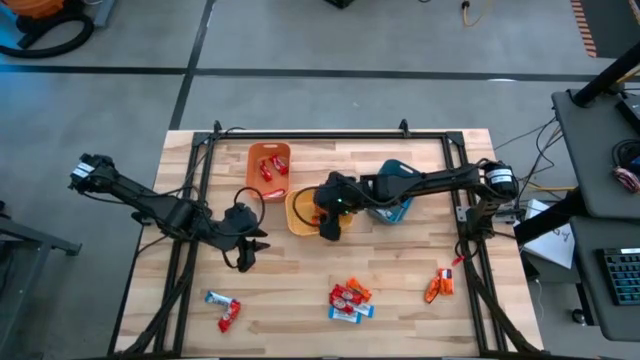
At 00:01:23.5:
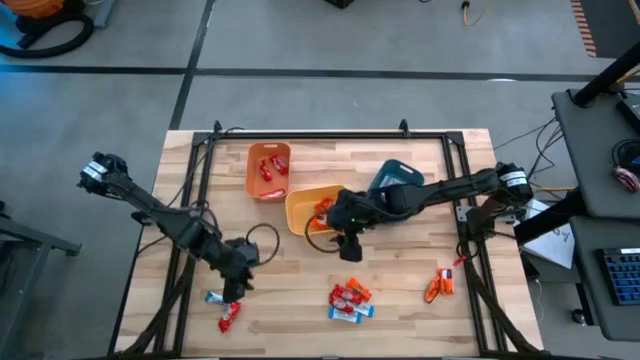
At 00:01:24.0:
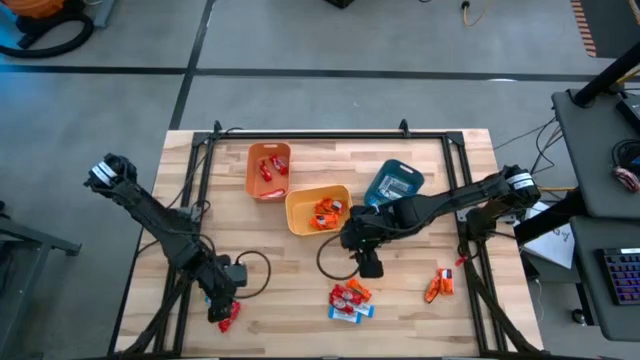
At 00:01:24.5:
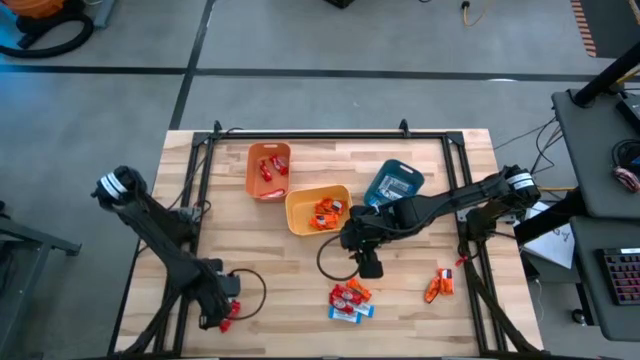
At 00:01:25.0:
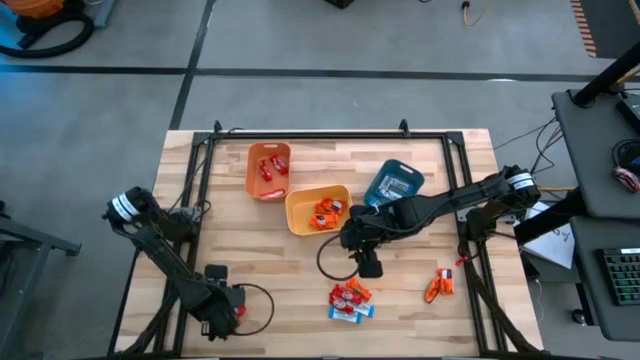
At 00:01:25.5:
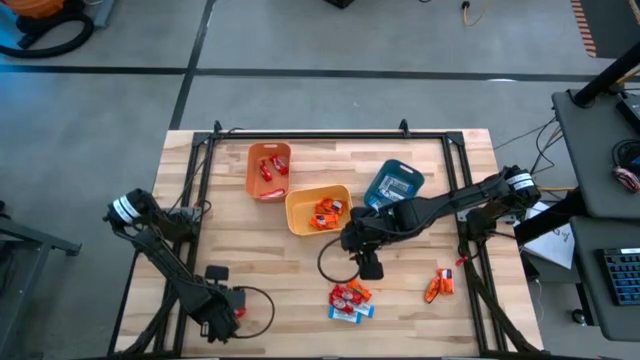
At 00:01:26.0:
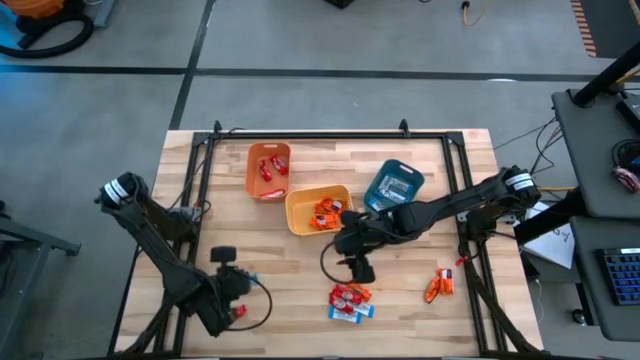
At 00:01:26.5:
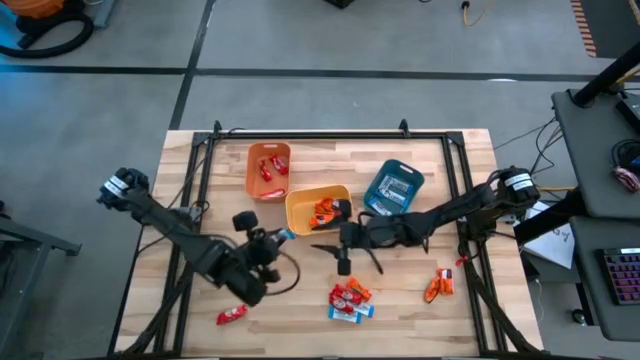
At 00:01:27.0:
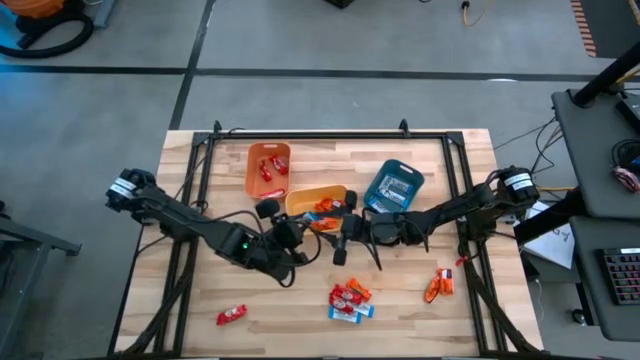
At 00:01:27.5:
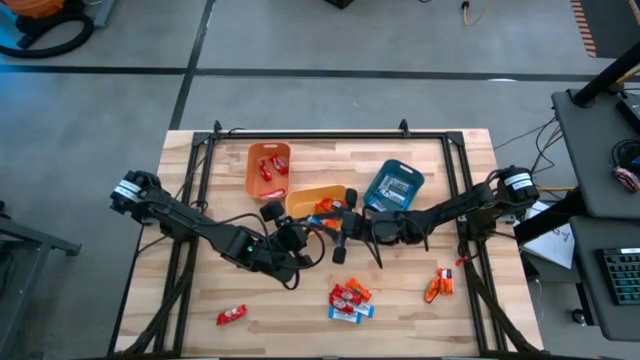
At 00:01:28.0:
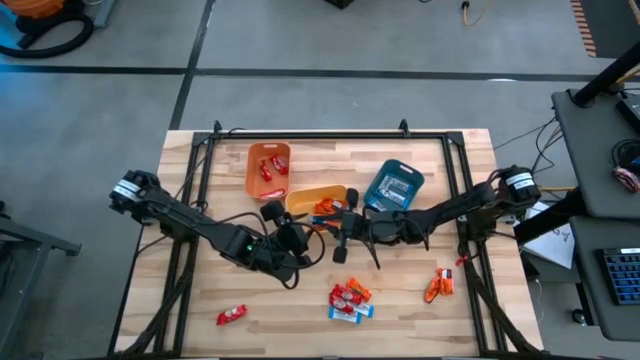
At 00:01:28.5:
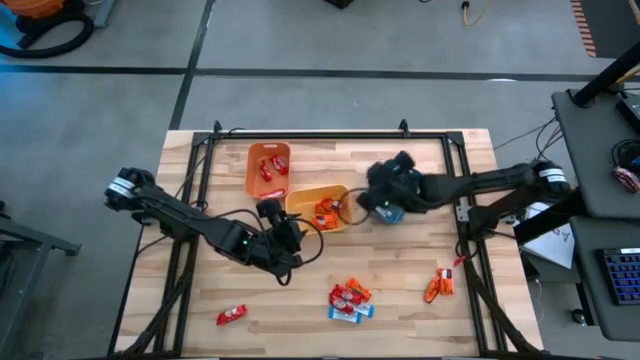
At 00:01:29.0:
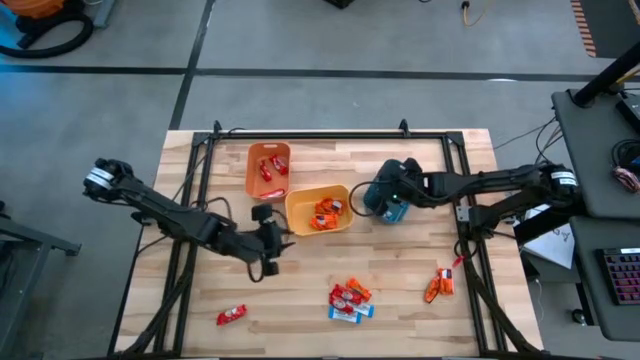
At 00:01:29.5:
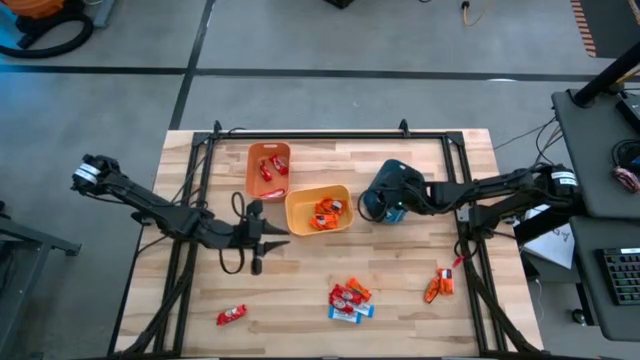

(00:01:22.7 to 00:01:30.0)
Task: Sort candy
Put the white chocolate into the blue bin

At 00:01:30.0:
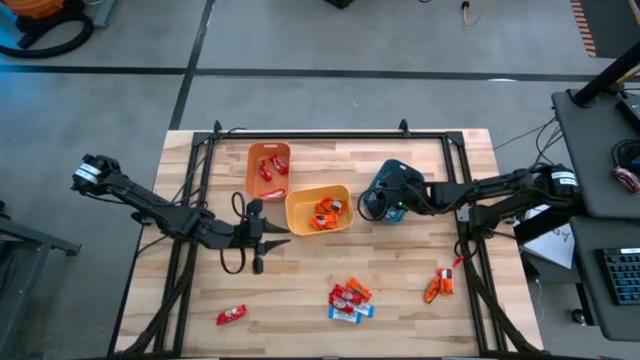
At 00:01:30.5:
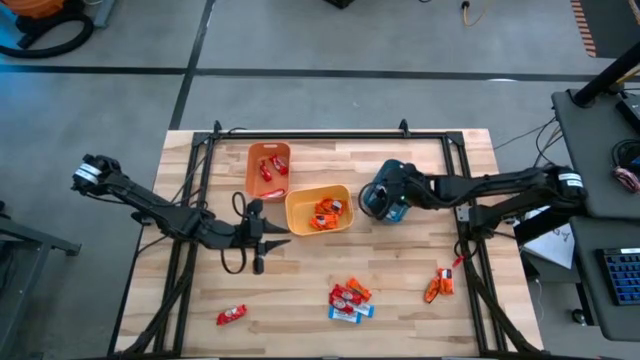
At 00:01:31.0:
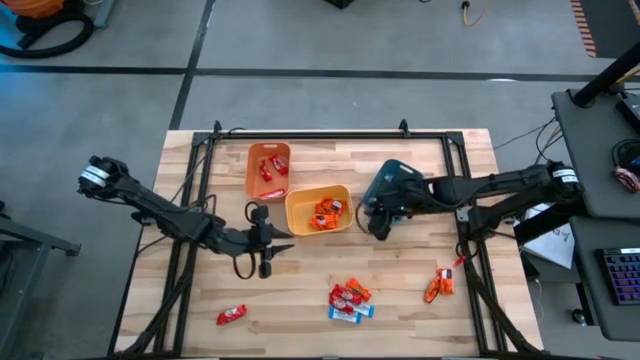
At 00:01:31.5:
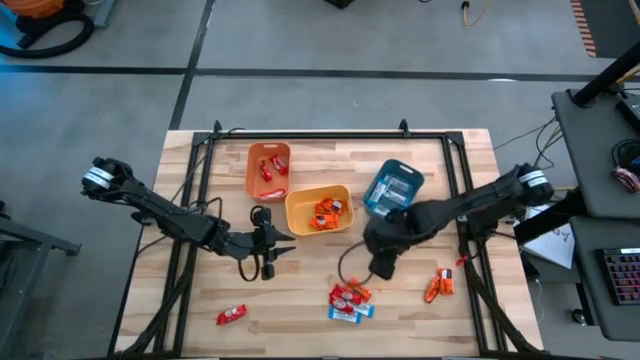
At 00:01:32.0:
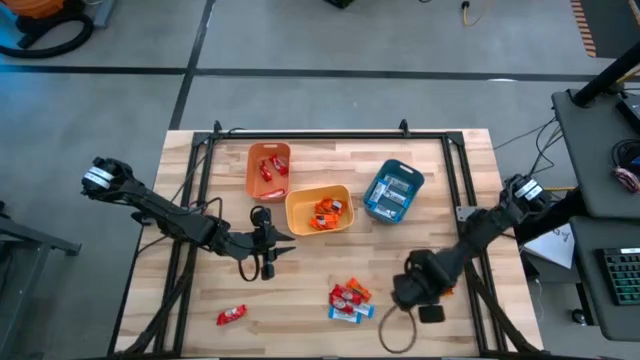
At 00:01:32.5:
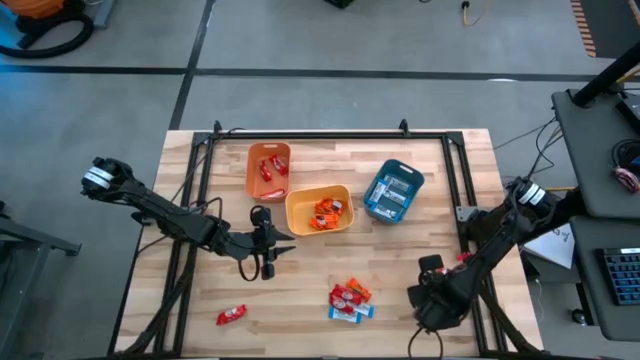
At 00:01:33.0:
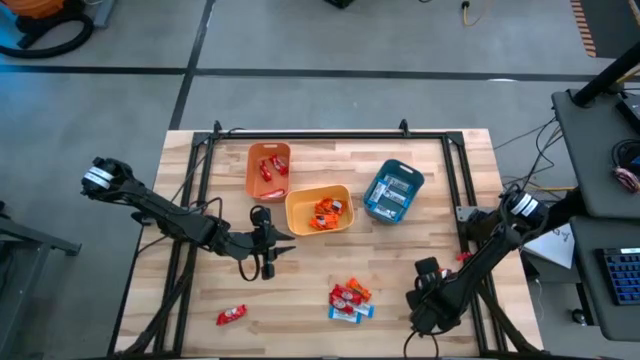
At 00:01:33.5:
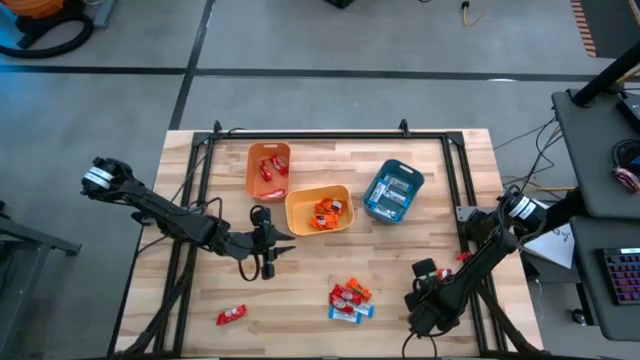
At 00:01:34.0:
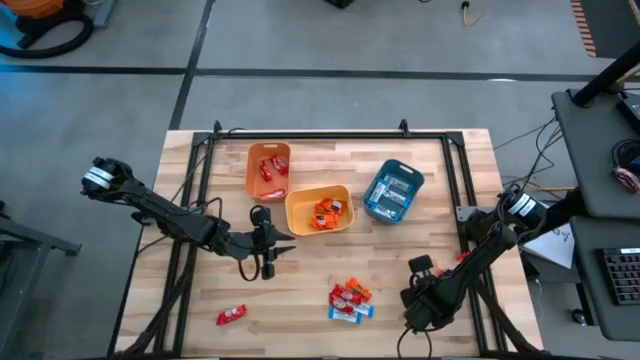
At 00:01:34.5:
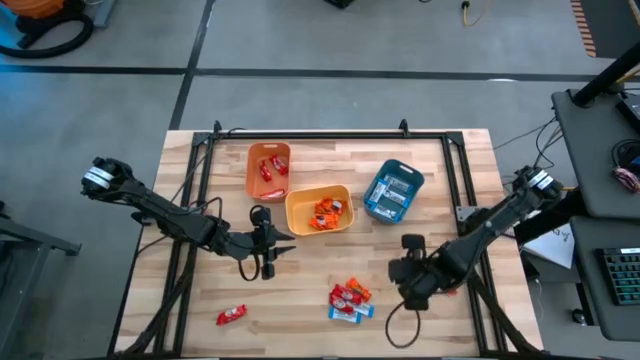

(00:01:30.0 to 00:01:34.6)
Put the orange chocolate into the yellow bin

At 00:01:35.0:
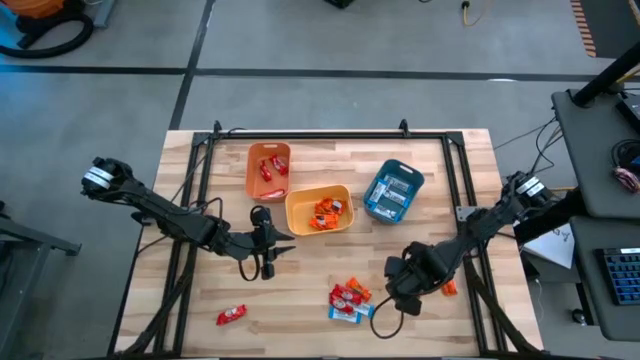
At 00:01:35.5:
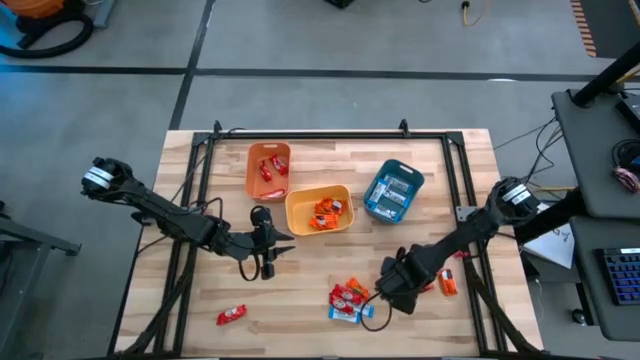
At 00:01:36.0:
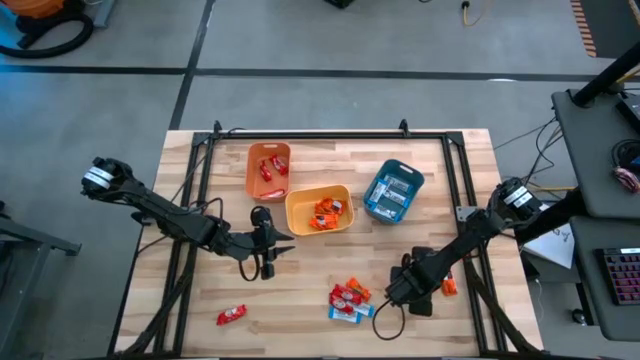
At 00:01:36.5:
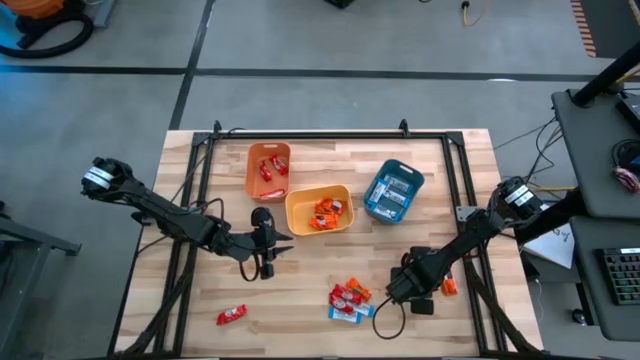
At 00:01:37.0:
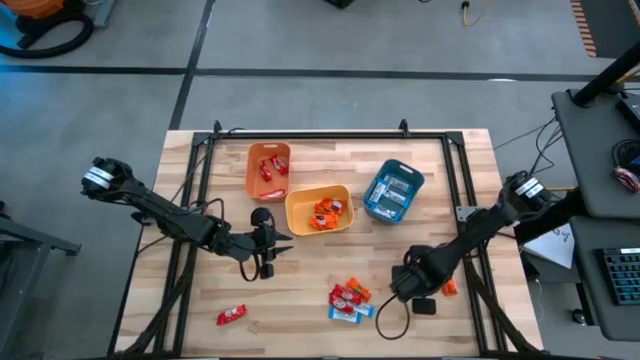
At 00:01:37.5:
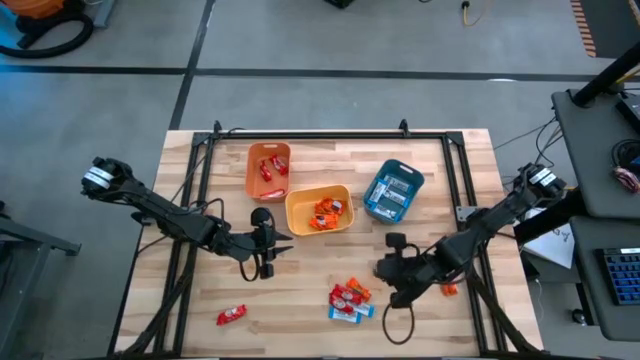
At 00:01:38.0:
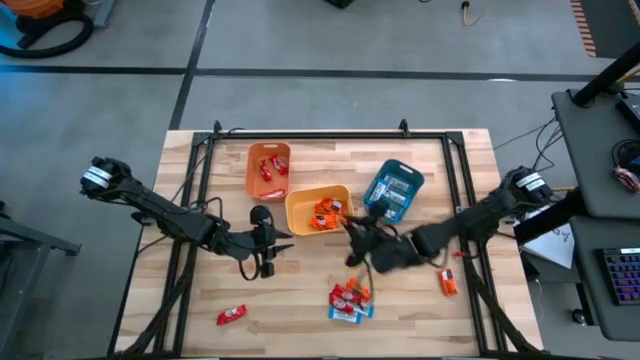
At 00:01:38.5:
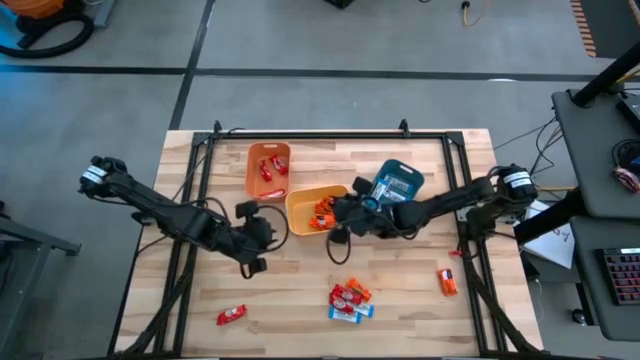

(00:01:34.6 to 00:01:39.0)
Put the orange chocolate into the yellow bin

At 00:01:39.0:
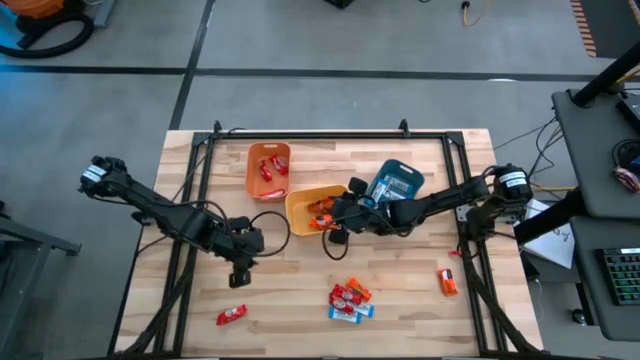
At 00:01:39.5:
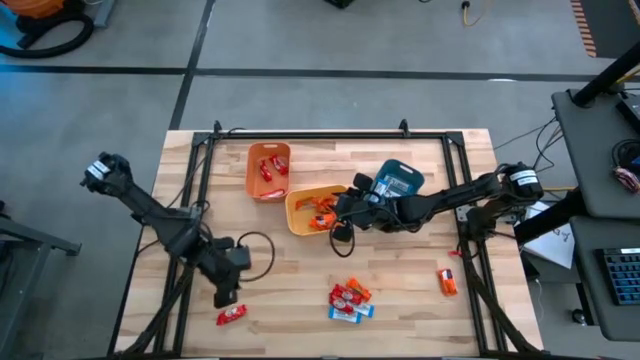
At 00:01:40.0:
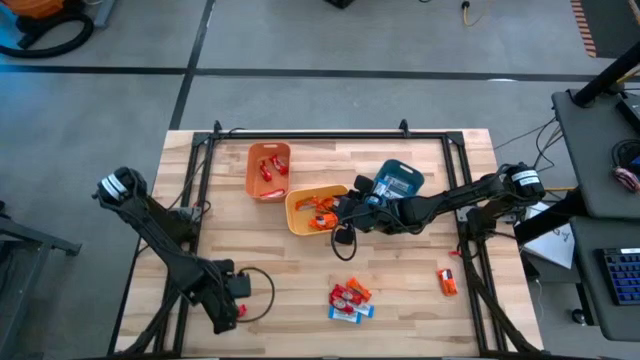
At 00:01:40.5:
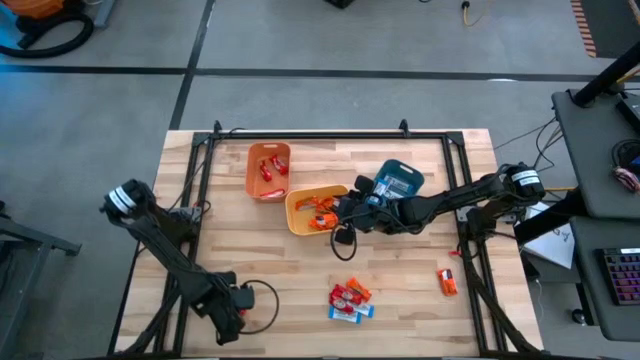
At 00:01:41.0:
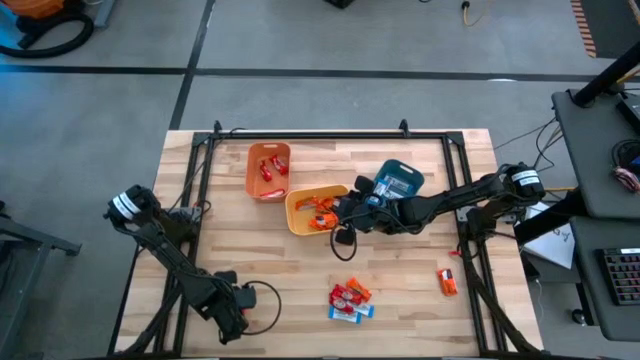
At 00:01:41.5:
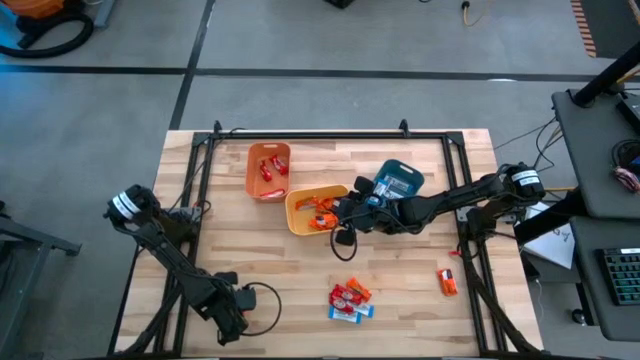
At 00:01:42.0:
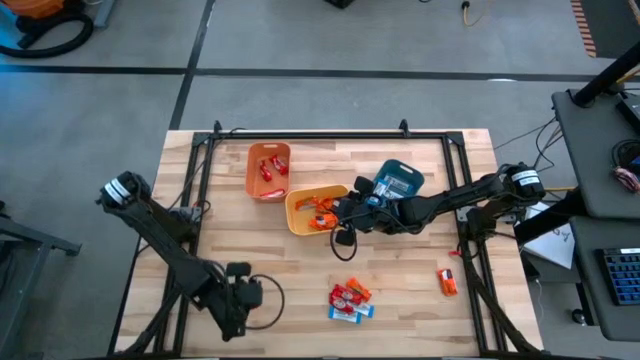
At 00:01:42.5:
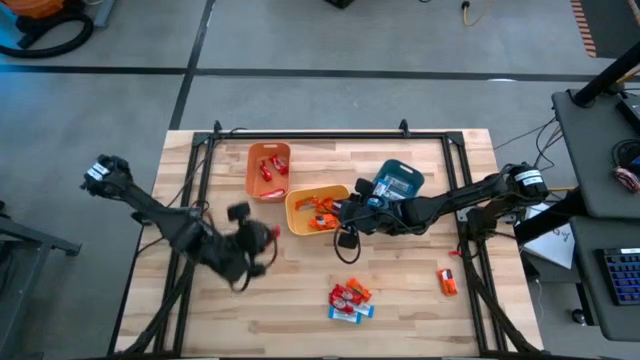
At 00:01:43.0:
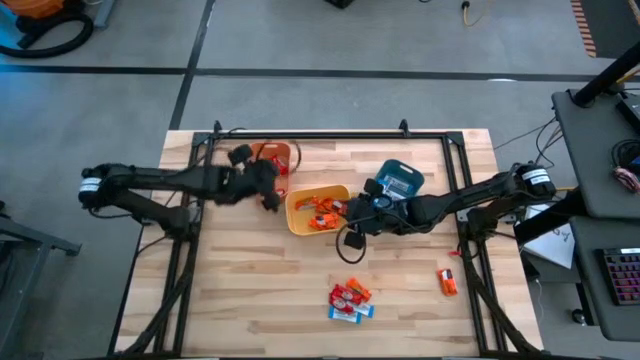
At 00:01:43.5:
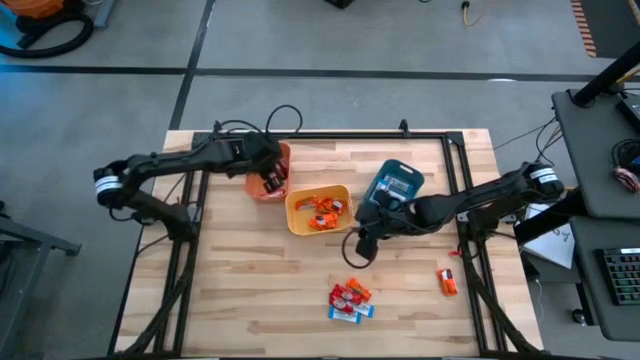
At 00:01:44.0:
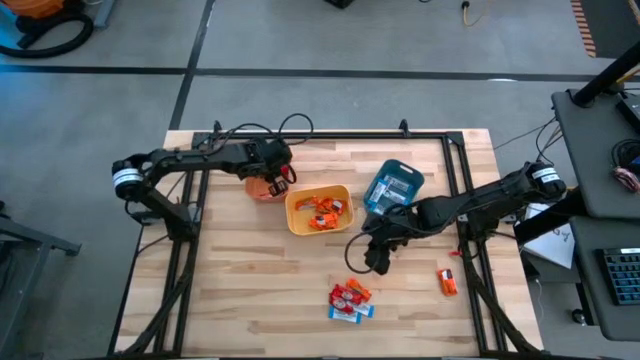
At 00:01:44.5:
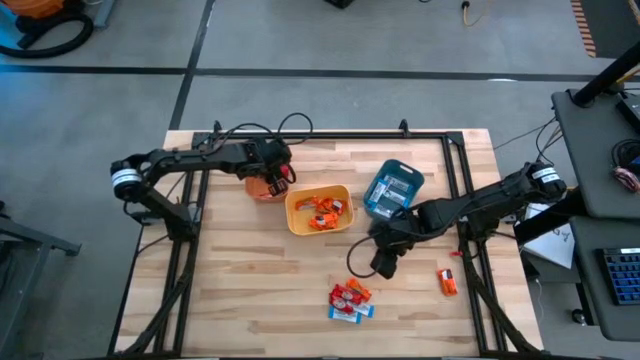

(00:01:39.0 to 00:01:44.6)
Put the red chocolate into the orange bin
